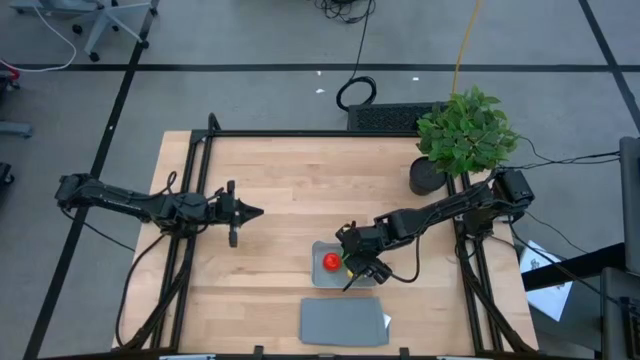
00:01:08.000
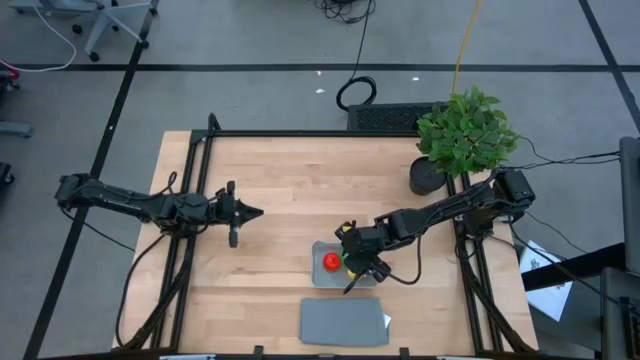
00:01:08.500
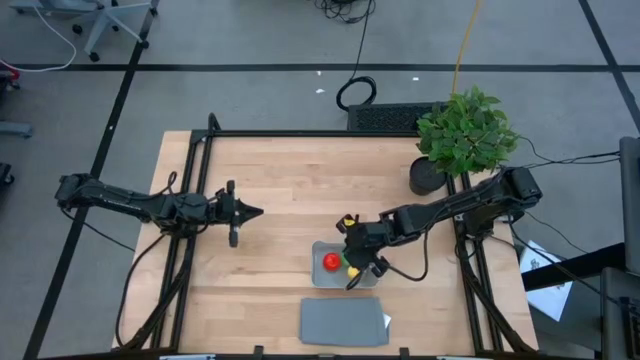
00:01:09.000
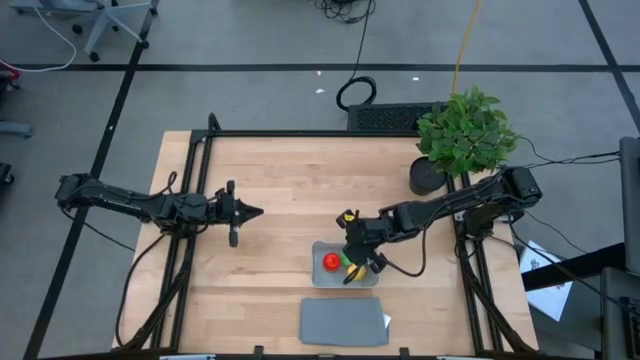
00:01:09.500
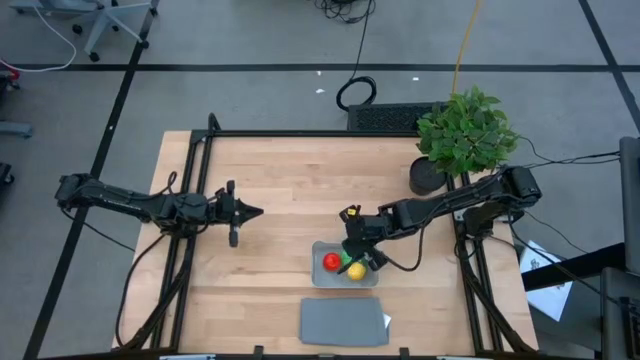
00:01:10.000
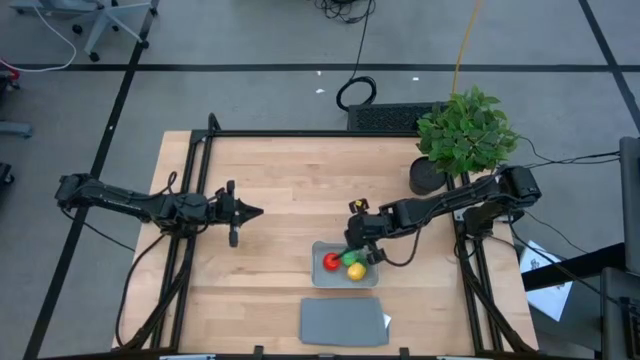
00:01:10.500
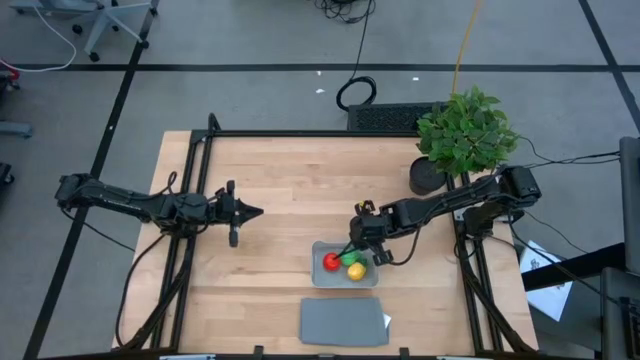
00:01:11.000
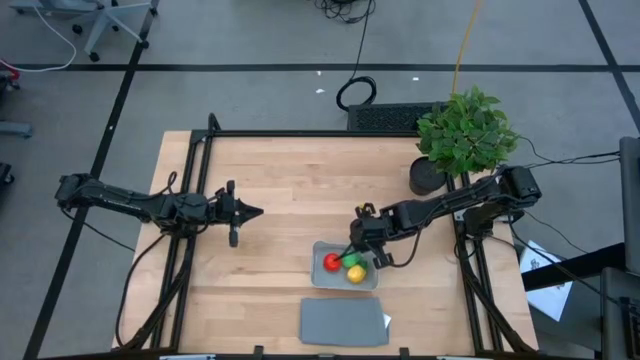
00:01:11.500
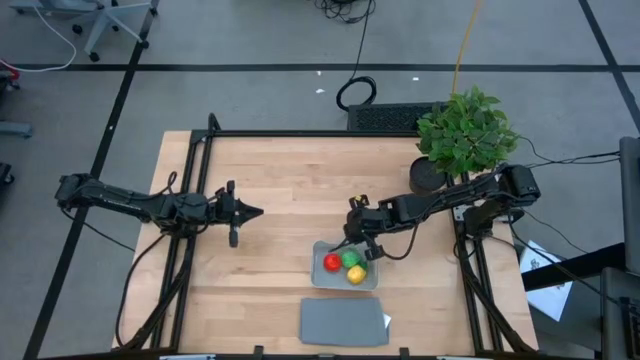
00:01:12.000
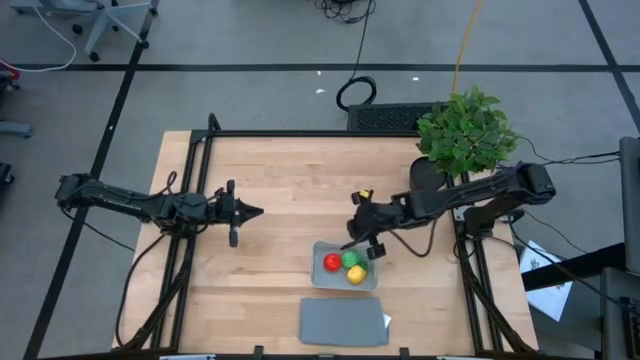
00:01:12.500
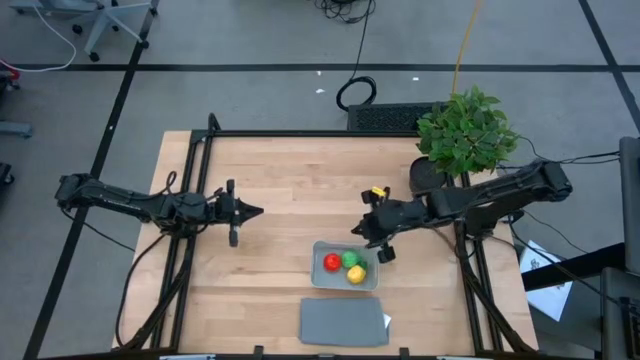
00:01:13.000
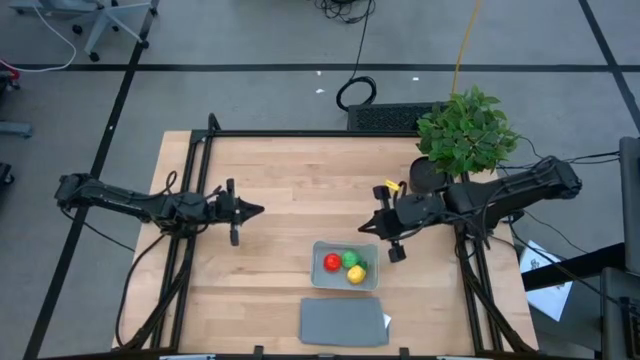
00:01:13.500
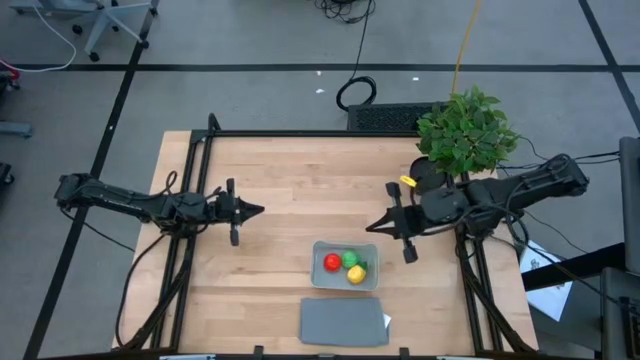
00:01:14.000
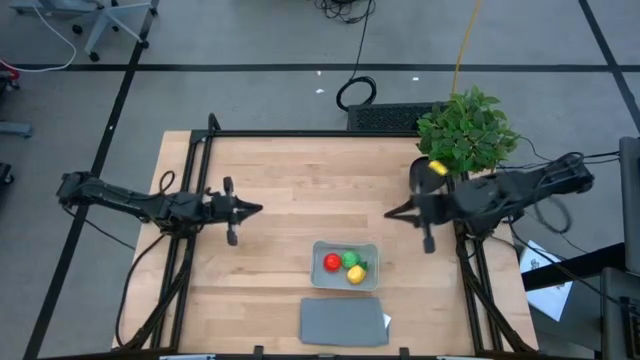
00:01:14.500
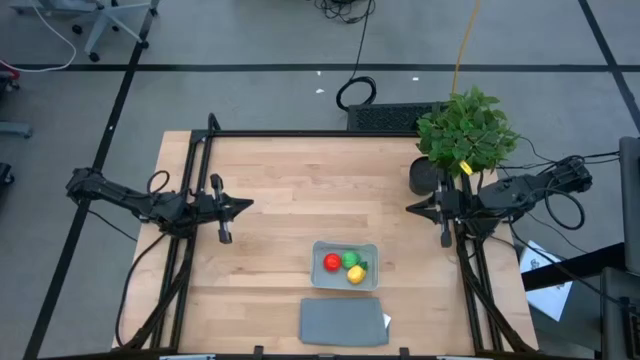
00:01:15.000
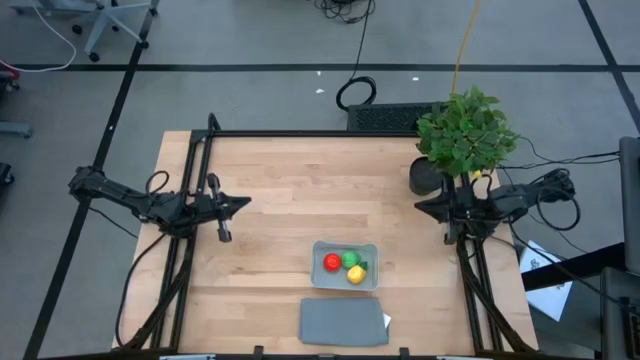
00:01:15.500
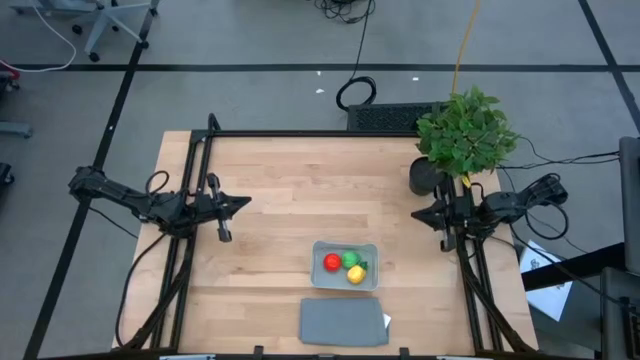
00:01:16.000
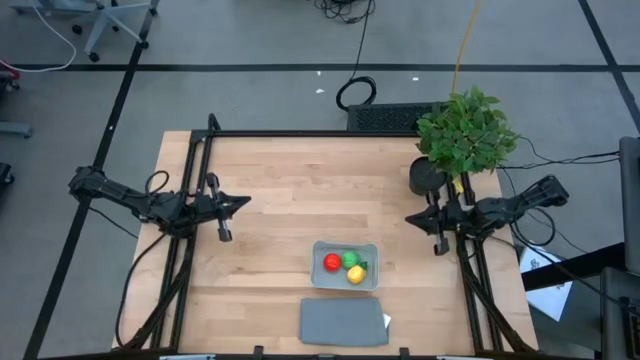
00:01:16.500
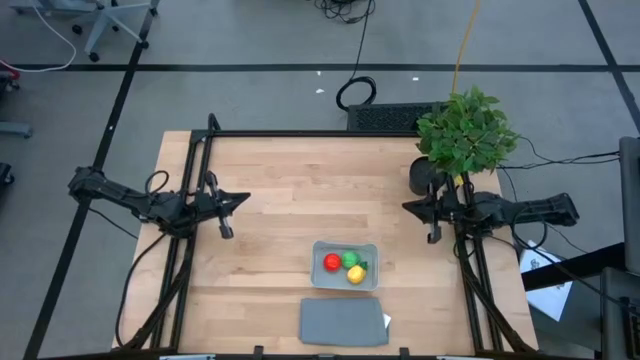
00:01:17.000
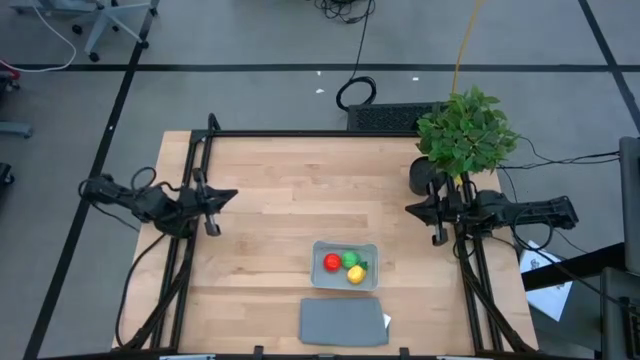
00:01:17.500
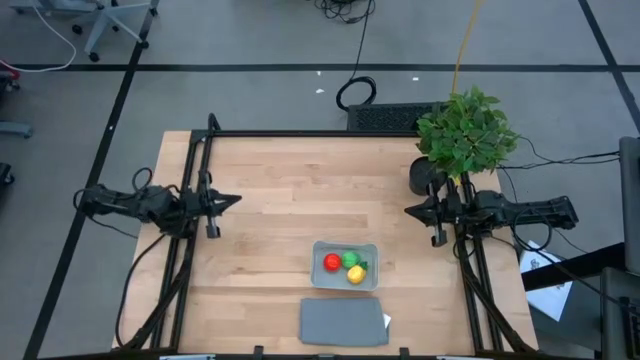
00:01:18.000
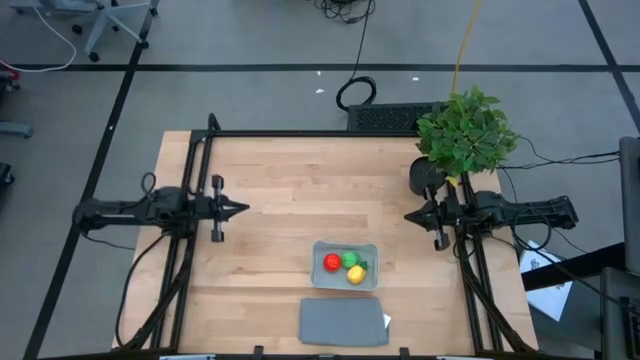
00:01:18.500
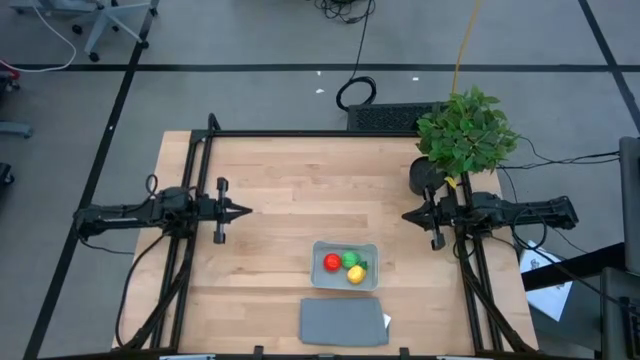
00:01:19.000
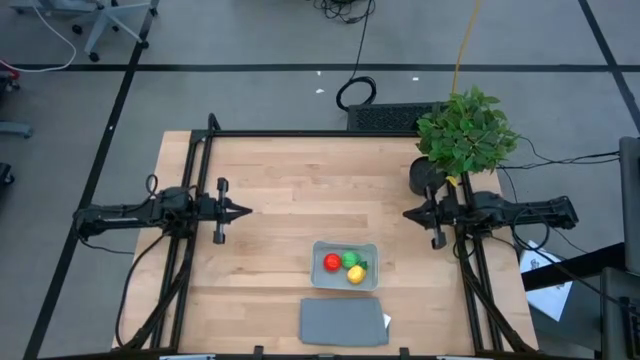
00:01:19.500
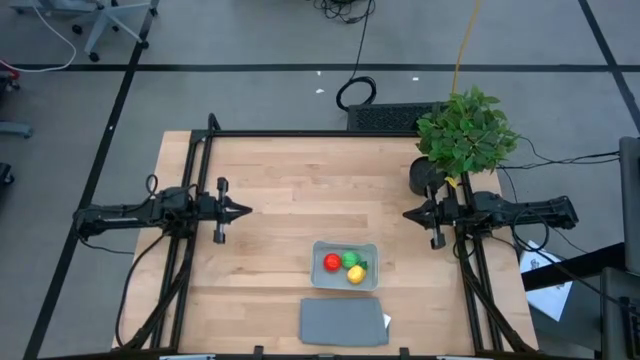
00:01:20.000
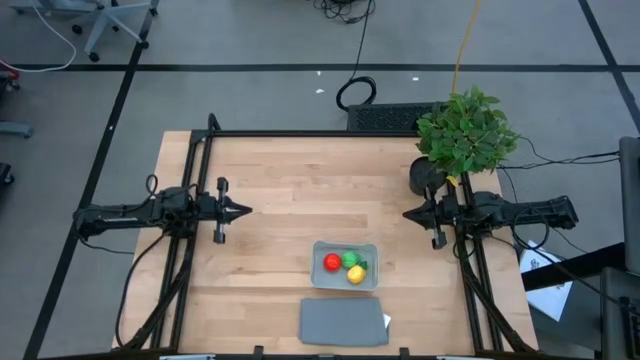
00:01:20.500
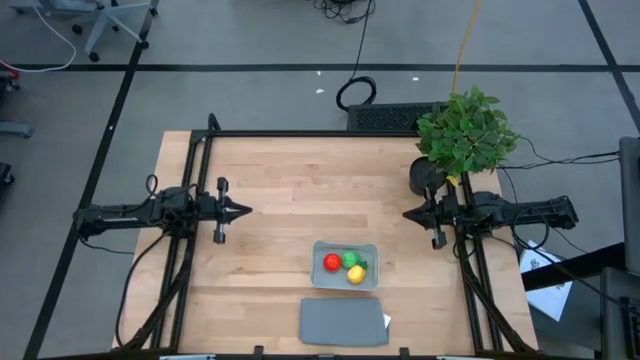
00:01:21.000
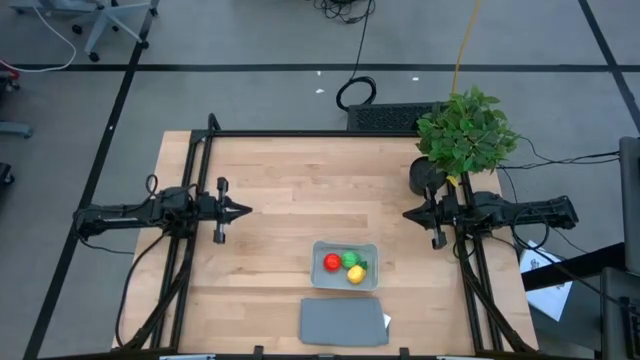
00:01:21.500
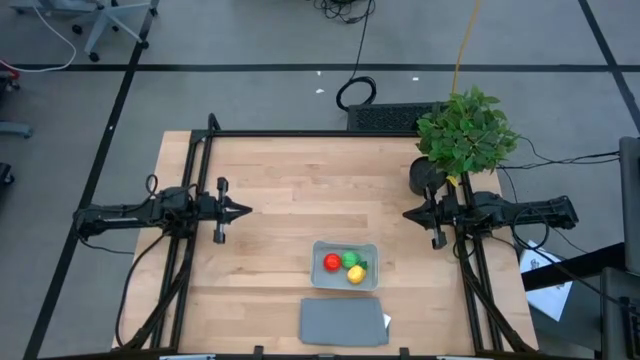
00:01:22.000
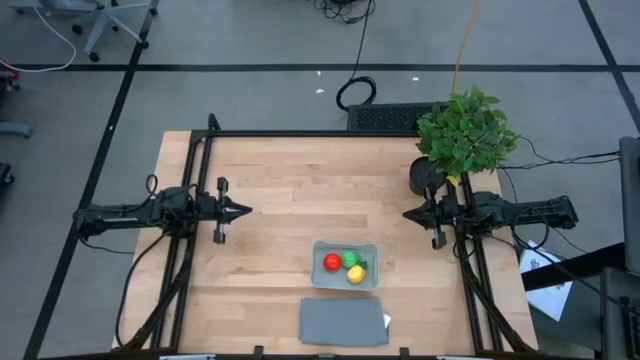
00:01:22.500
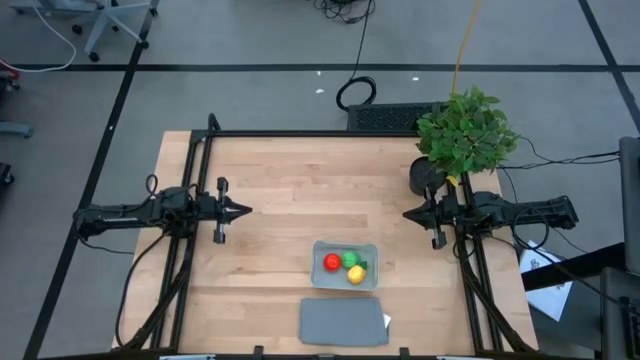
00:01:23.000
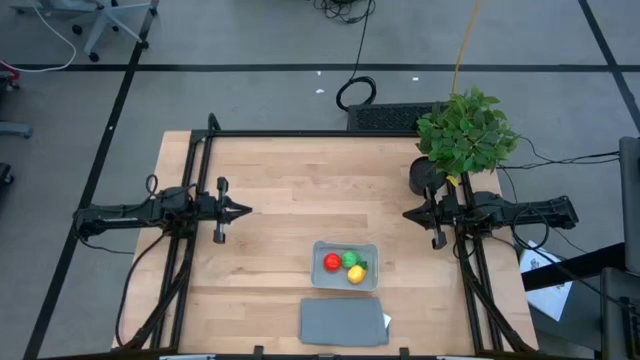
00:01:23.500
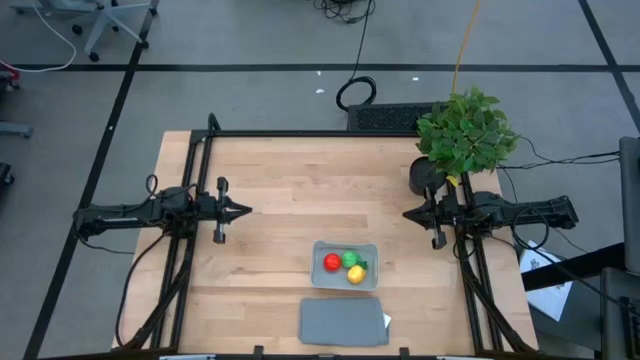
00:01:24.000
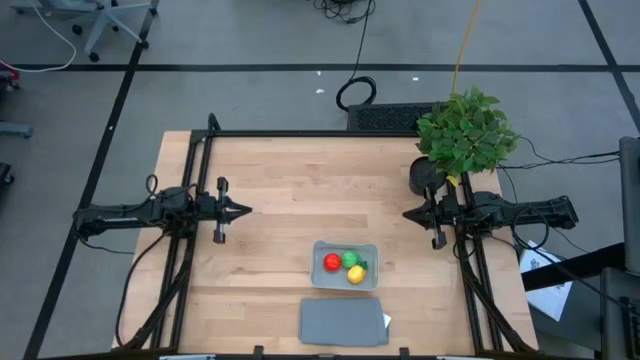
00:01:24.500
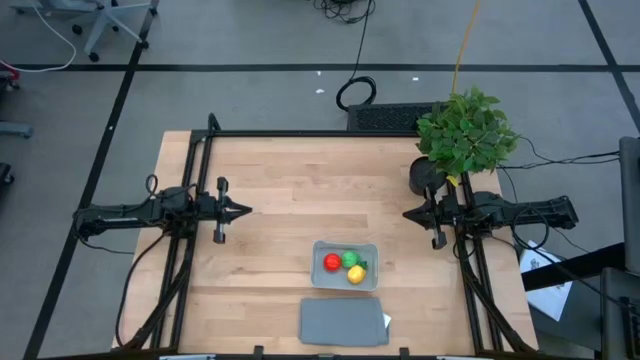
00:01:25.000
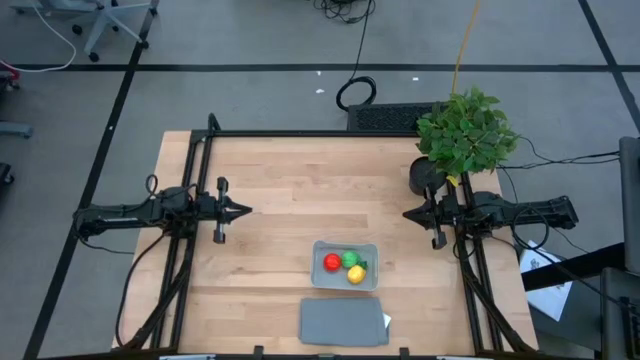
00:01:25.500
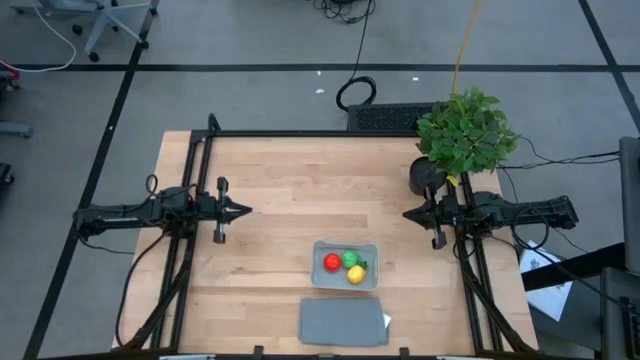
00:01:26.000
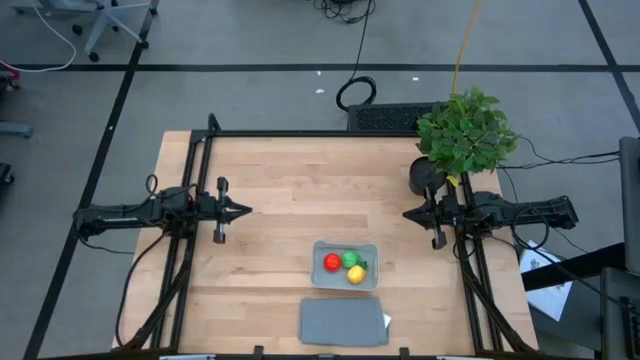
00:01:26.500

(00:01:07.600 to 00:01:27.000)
Task: Pick and placing Produce into tupperware
Return to Home Position

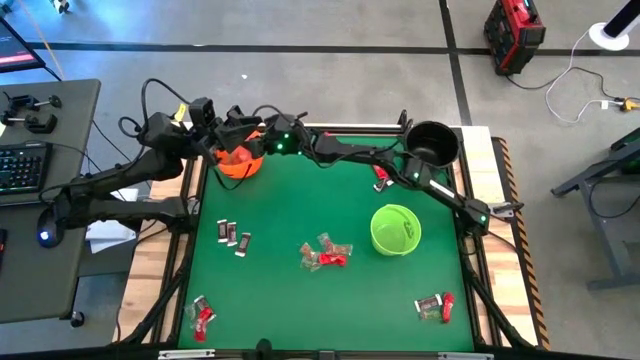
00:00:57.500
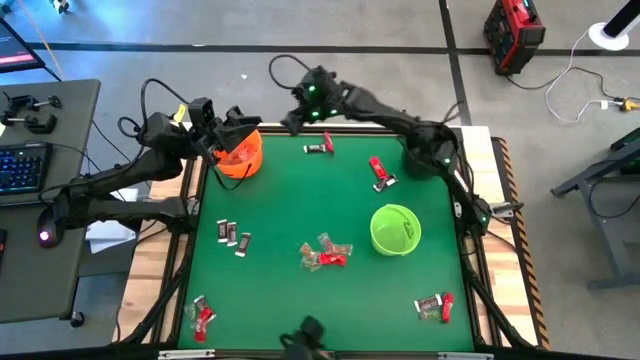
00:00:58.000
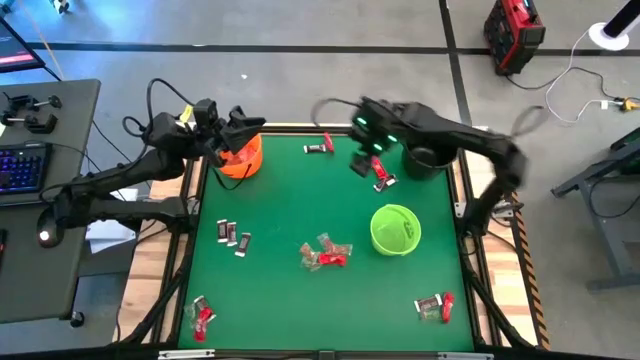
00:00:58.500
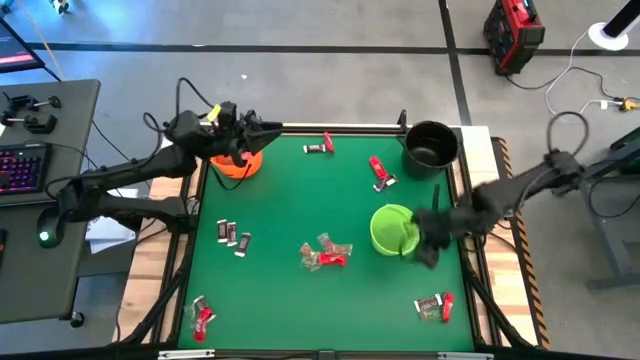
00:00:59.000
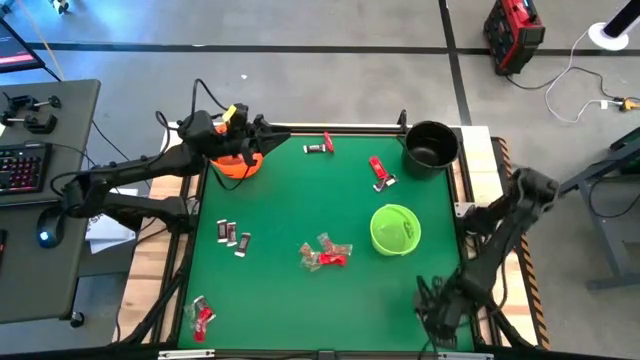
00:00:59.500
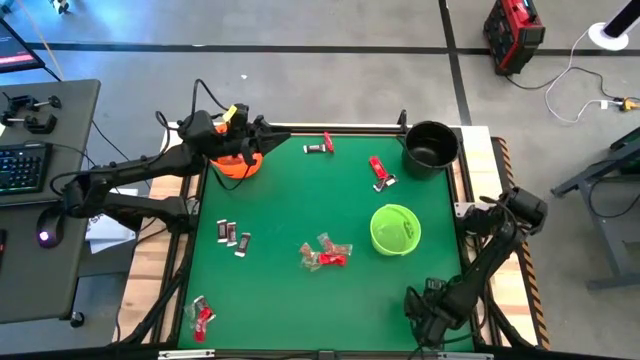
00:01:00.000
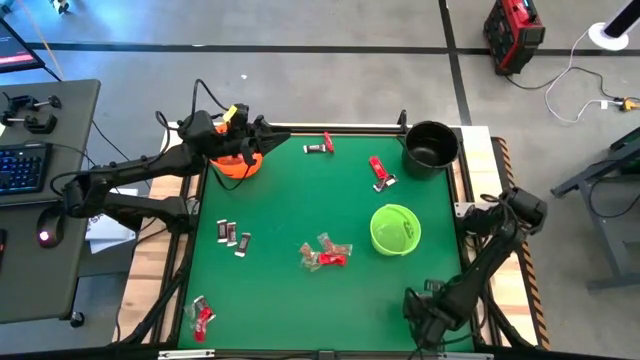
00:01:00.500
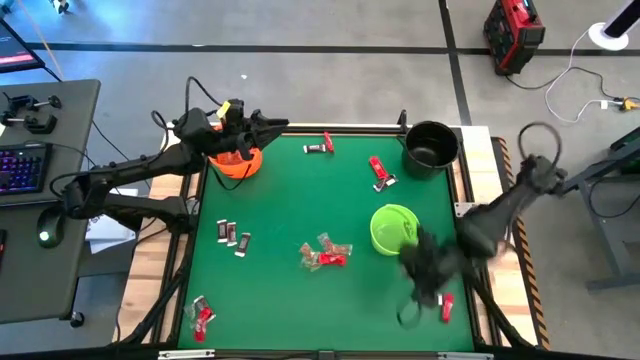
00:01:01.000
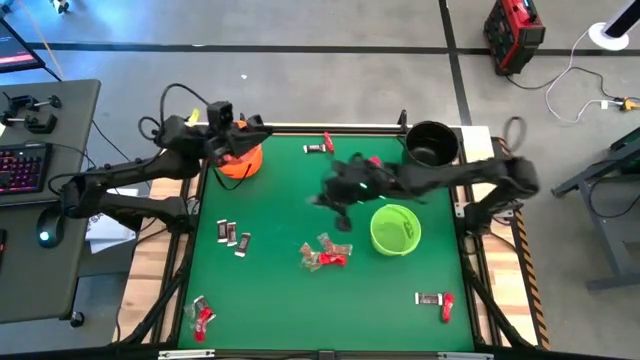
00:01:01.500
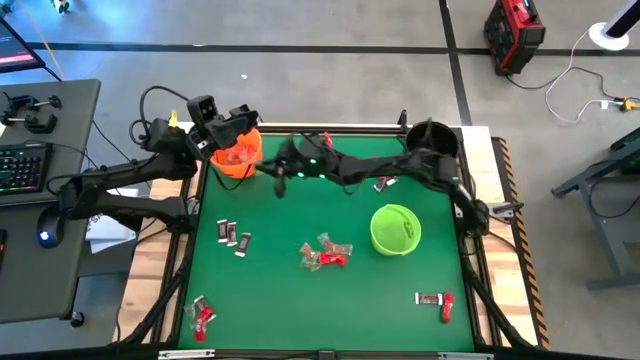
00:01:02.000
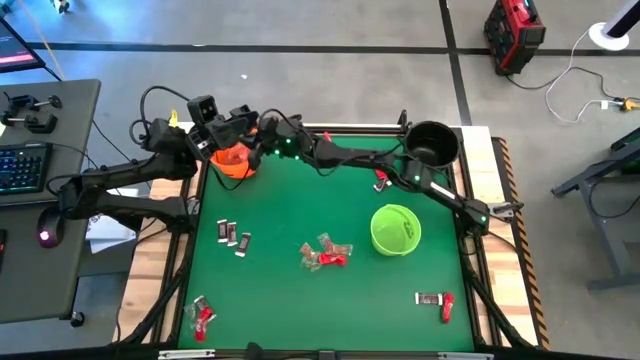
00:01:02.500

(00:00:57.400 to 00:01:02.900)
Task: Sort candy by brand, put in halloween buckets
Put the green gummy into the orange bucket
